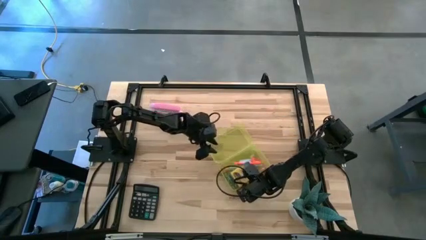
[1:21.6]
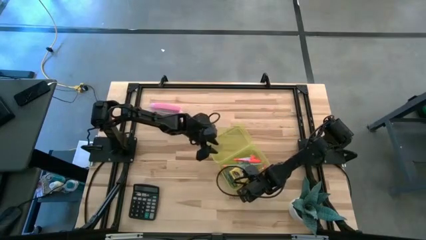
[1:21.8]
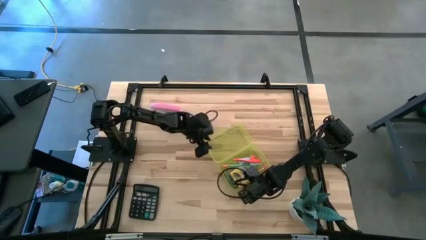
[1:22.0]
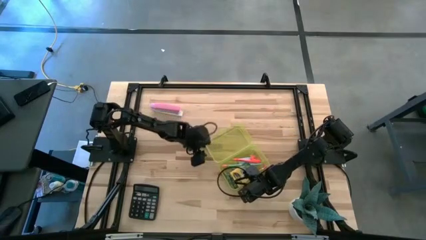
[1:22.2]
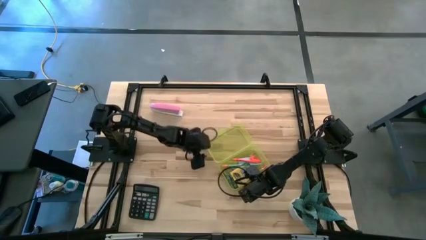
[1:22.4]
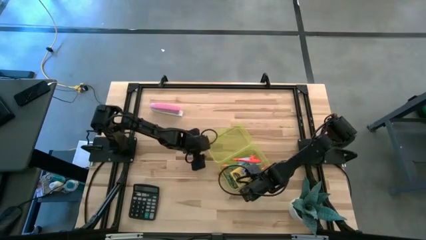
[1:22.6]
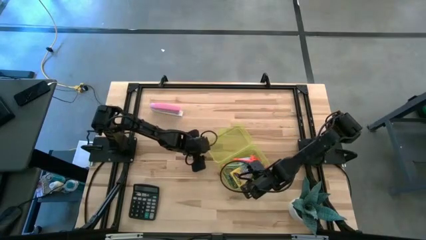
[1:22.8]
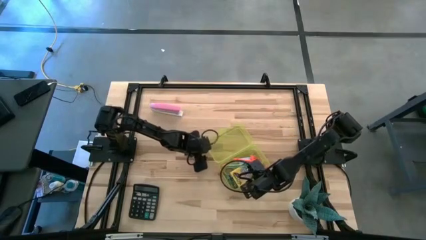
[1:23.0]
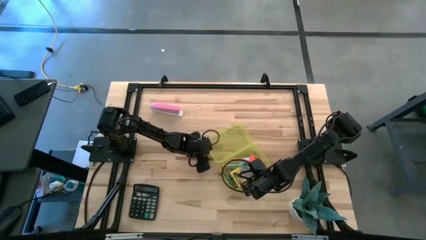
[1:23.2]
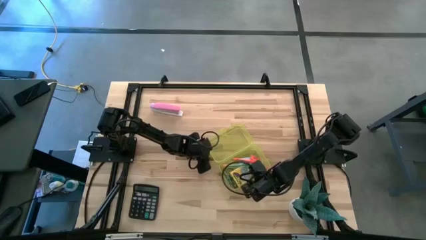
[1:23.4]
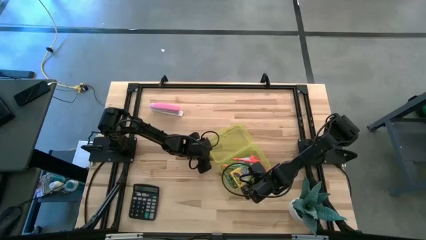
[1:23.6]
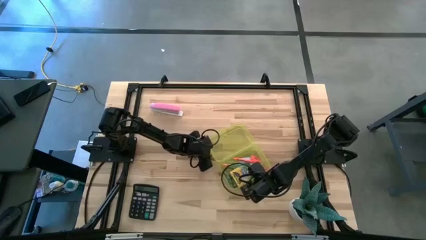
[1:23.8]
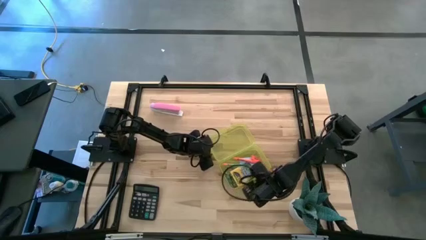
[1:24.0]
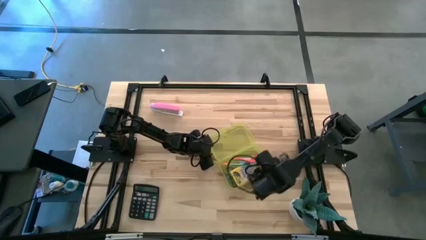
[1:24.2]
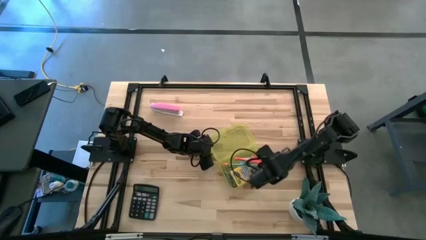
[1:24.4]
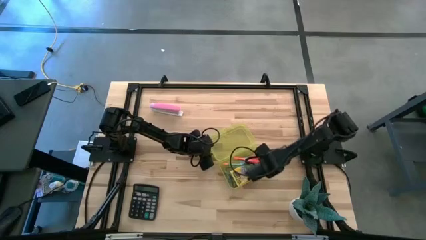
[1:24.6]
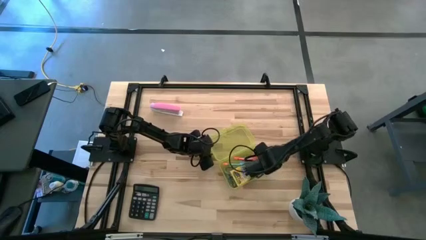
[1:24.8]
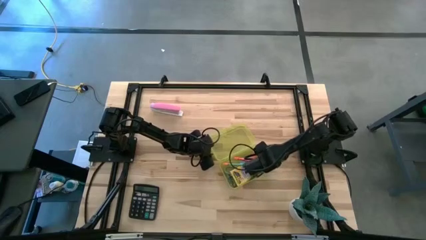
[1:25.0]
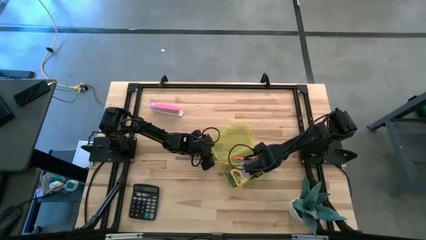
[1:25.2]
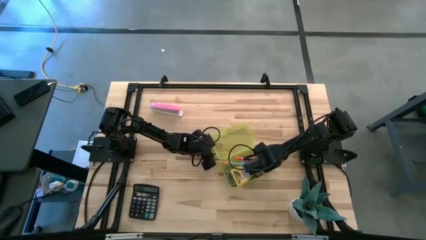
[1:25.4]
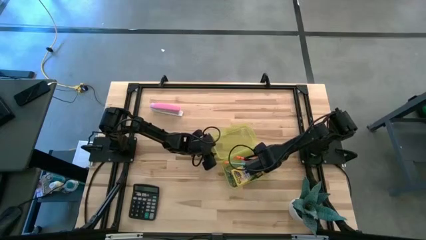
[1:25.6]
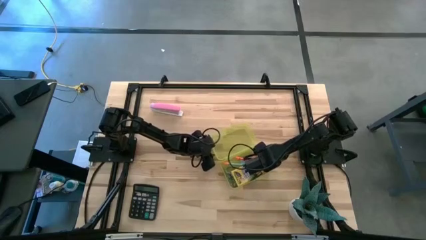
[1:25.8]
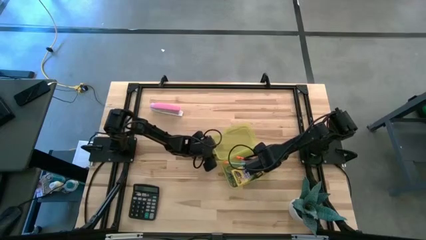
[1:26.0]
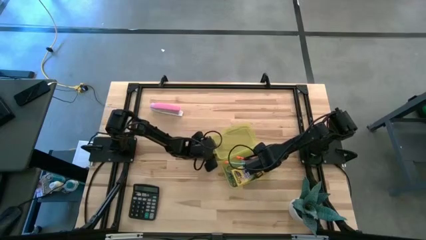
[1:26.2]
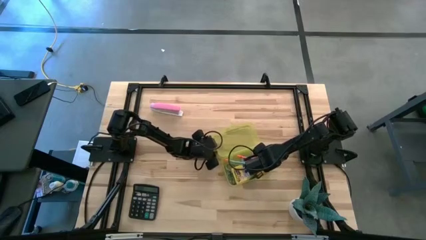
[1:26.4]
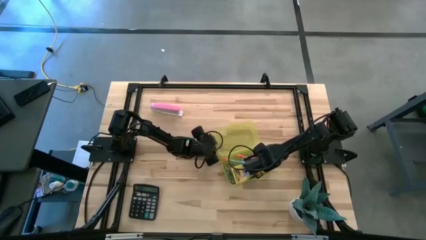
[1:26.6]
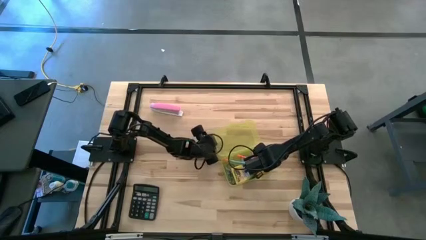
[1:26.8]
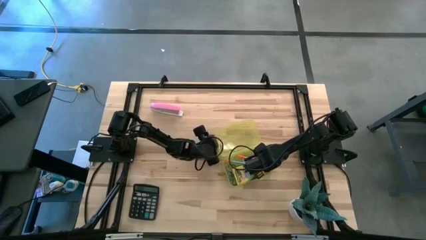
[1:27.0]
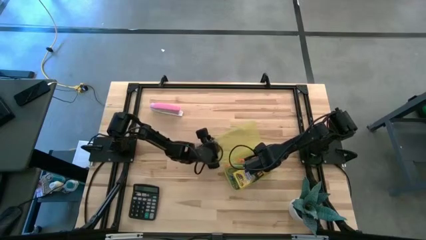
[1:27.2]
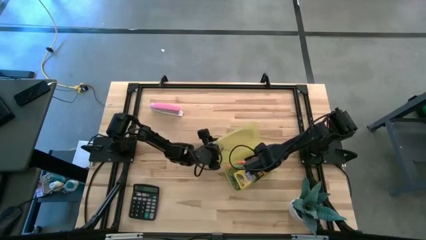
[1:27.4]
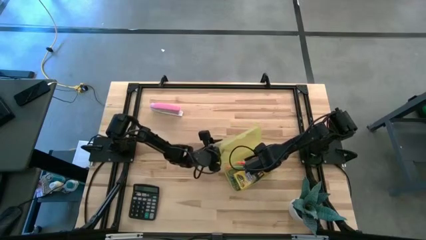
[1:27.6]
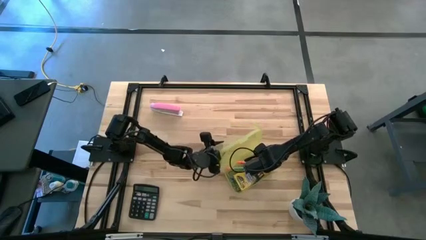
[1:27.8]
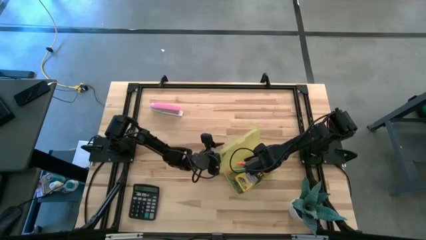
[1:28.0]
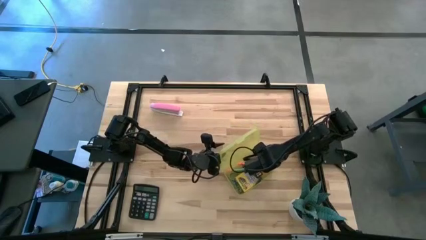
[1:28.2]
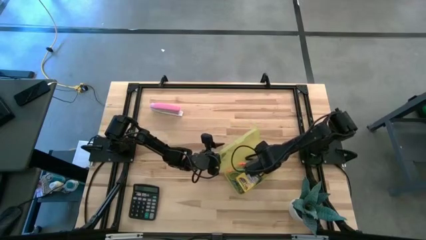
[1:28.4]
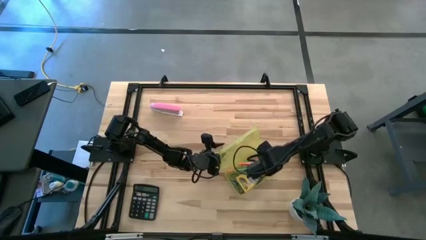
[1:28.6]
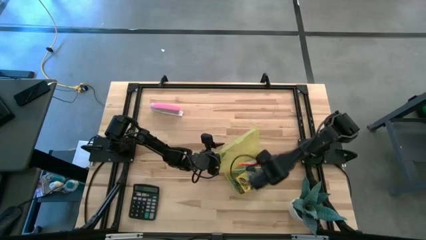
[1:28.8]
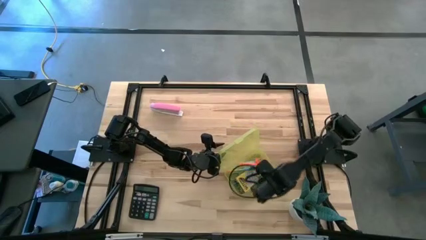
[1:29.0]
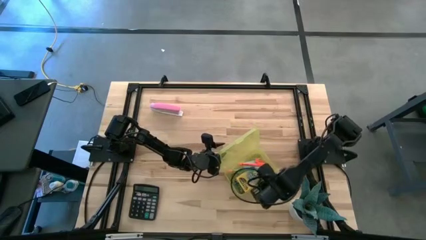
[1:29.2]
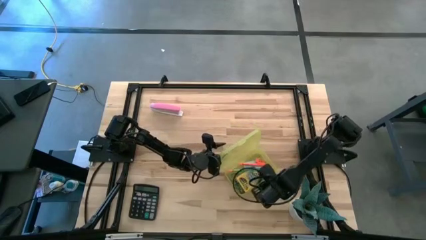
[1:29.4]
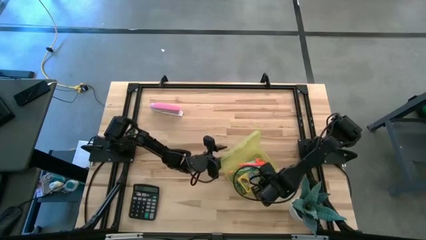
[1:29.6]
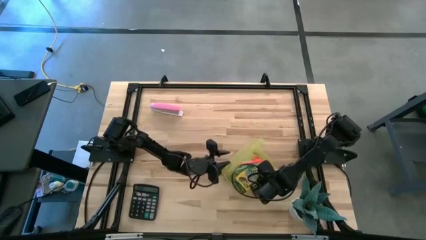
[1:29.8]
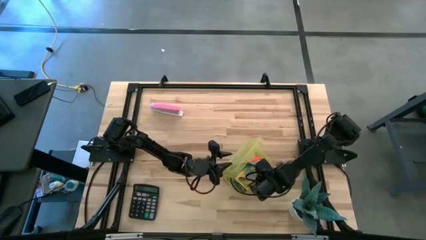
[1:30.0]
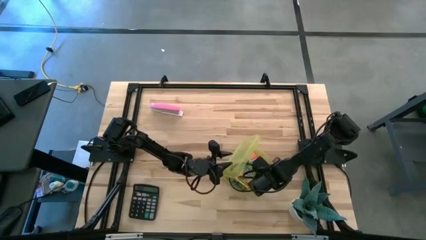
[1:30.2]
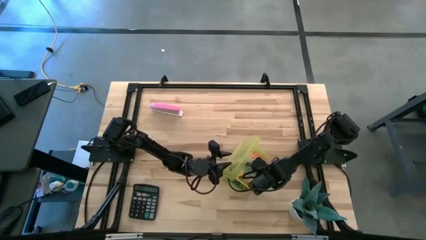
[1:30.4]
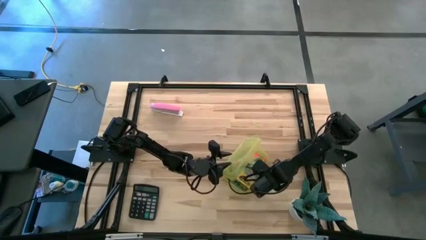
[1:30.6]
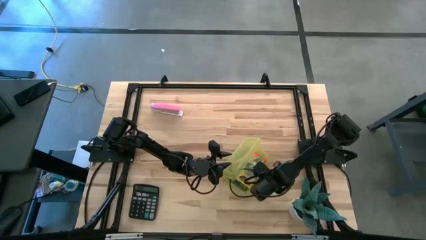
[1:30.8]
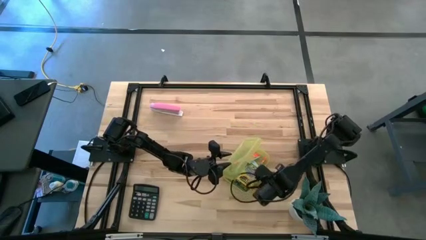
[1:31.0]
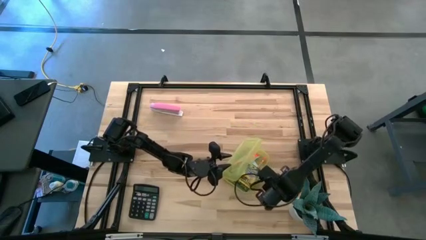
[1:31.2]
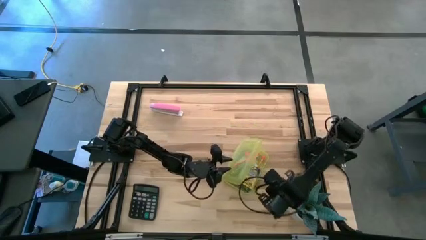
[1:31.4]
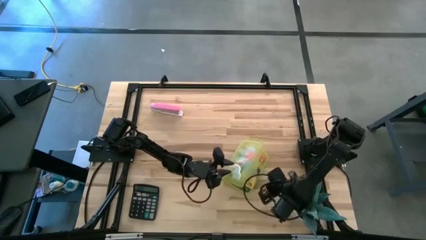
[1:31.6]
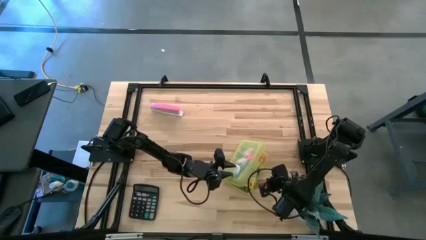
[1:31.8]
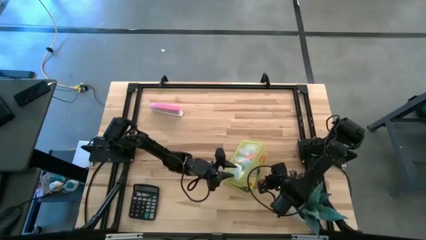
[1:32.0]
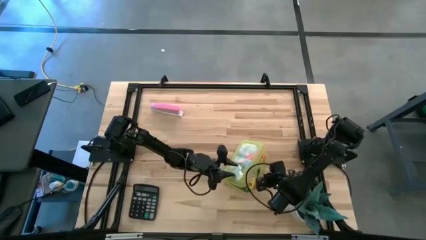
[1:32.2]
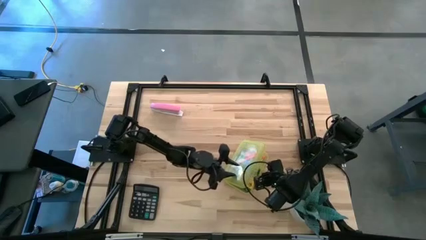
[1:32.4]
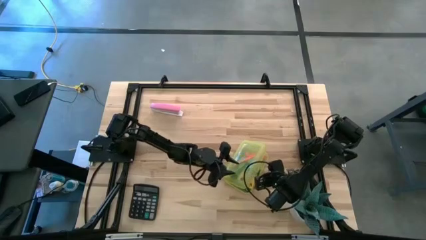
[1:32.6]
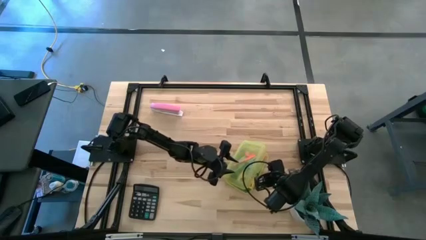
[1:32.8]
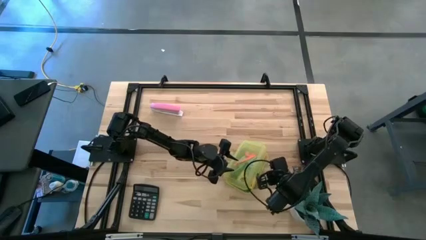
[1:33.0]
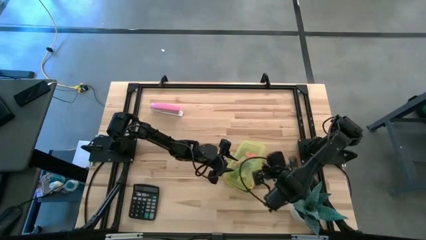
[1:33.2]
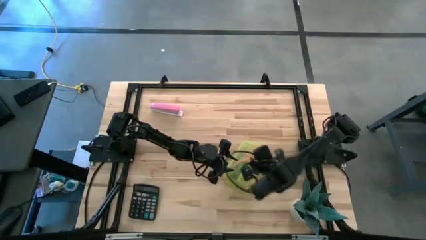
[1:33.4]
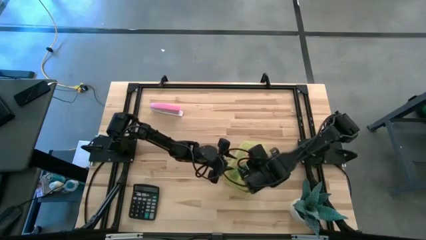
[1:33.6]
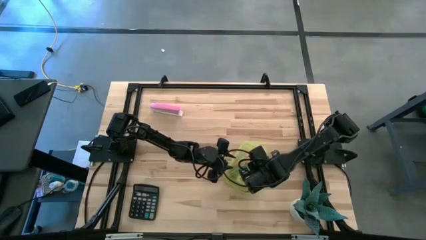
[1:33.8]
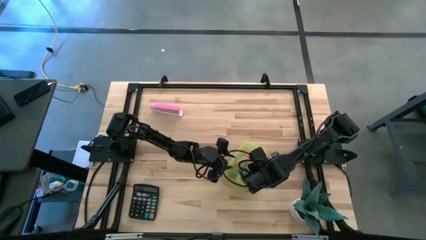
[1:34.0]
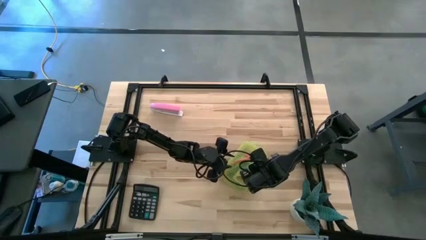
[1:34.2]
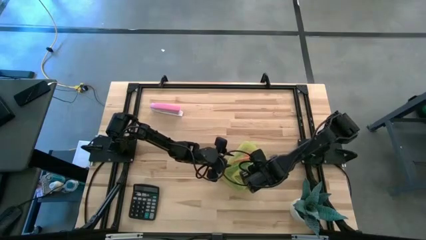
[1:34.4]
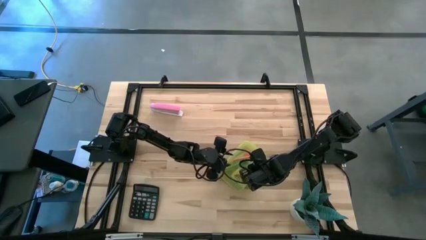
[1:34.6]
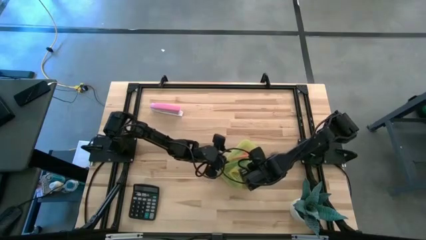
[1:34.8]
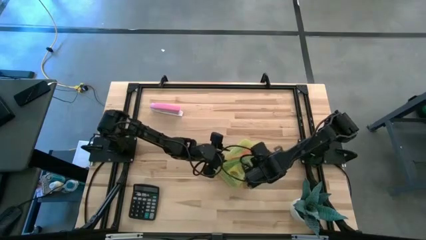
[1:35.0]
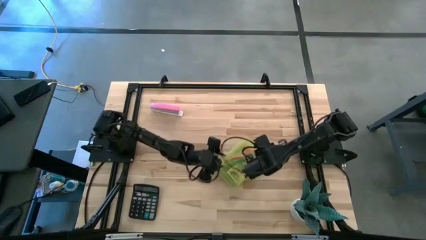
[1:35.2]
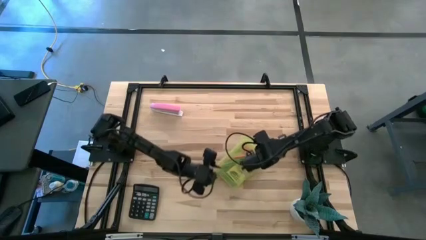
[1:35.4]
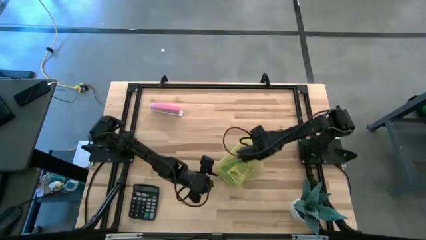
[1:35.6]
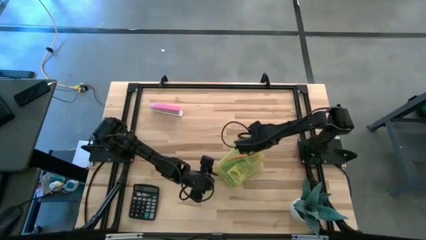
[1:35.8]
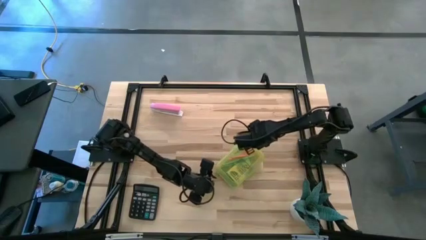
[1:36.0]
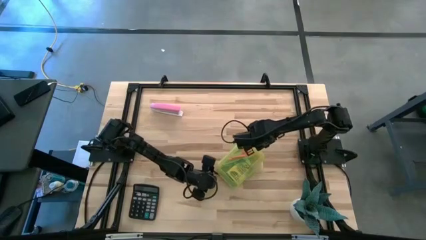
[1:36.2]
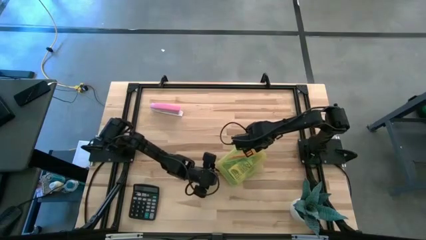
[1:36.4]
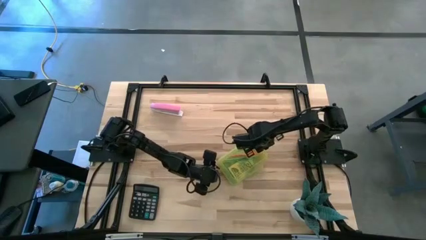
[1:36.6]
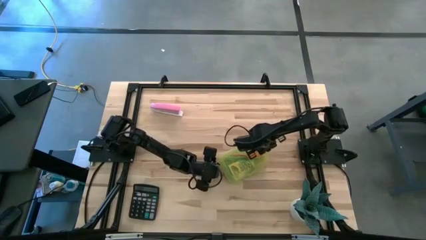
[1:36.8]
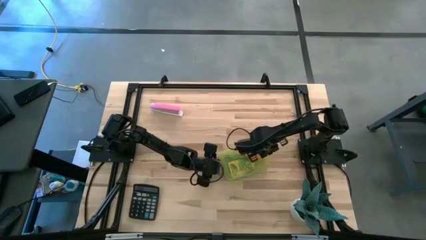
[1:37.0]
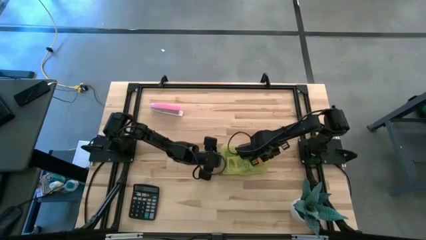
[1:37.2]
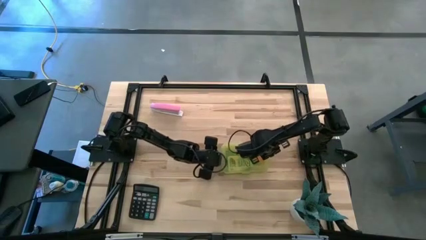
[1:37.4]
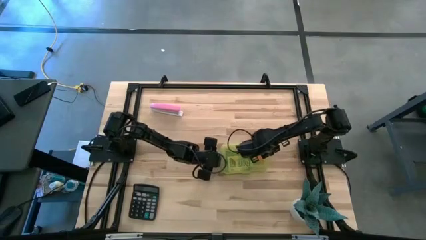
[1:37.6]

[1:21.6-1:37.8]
Task: Pack school essentials
Close the supply box
